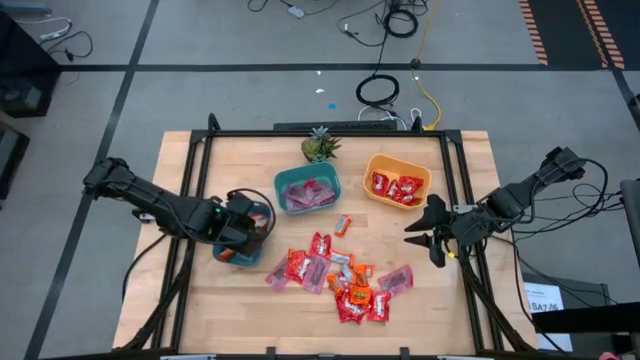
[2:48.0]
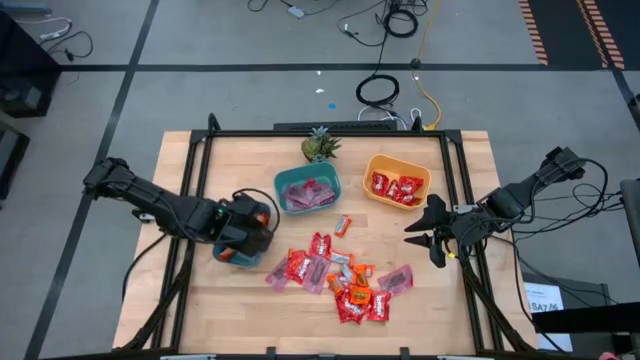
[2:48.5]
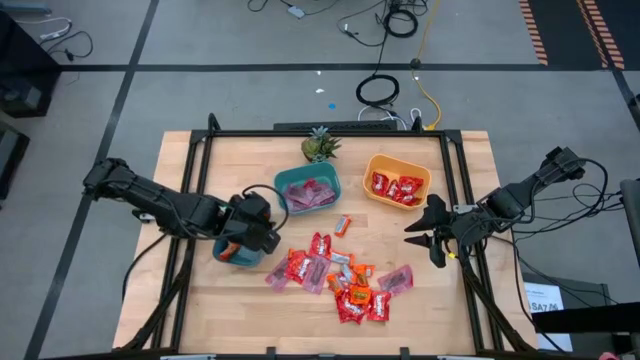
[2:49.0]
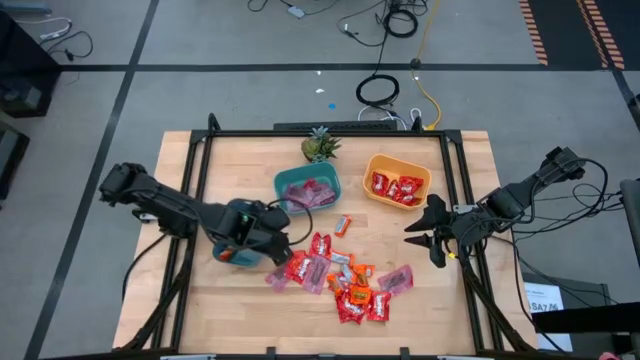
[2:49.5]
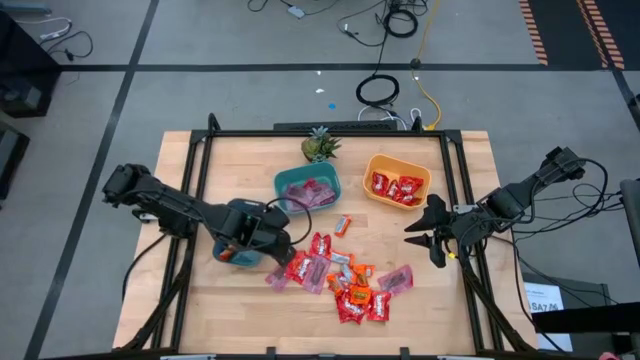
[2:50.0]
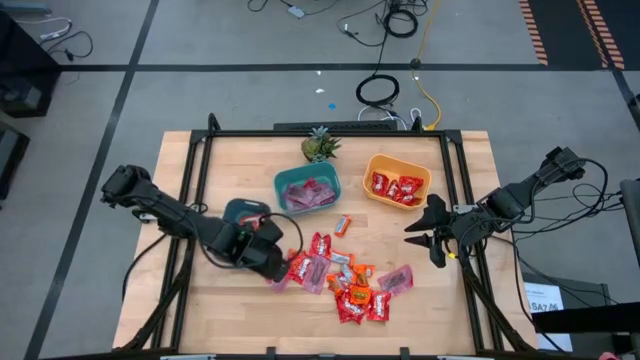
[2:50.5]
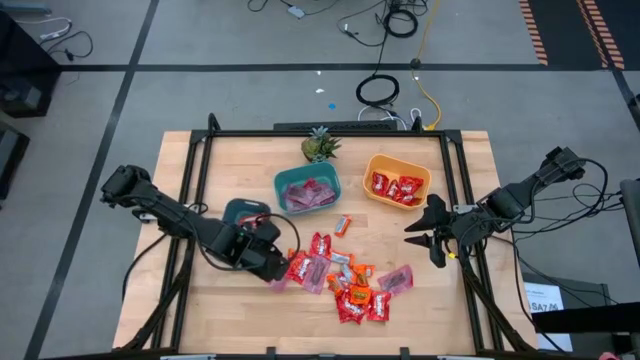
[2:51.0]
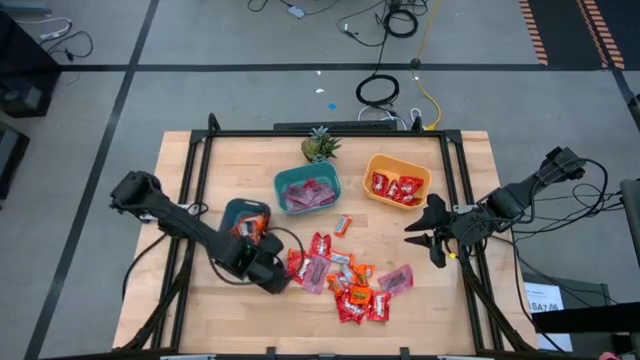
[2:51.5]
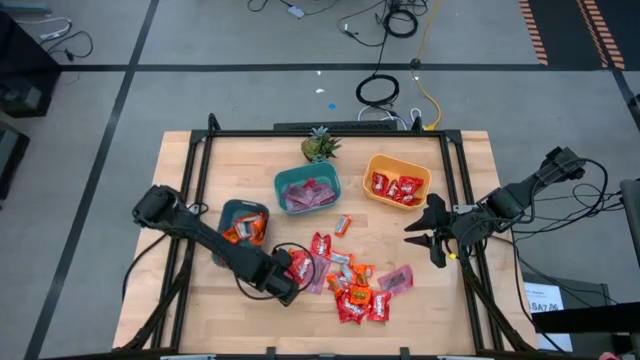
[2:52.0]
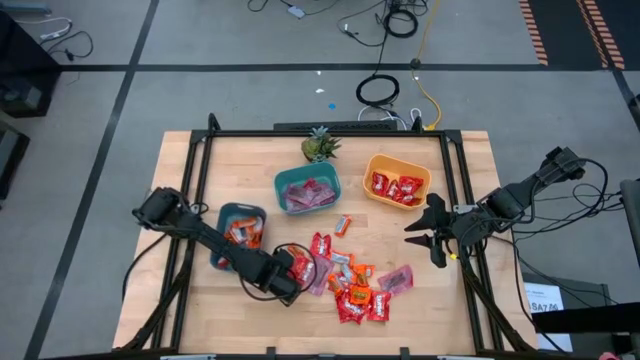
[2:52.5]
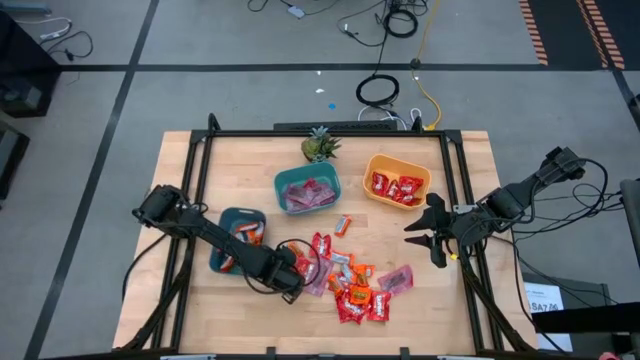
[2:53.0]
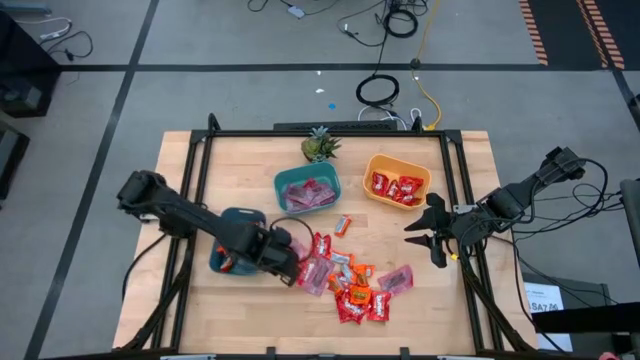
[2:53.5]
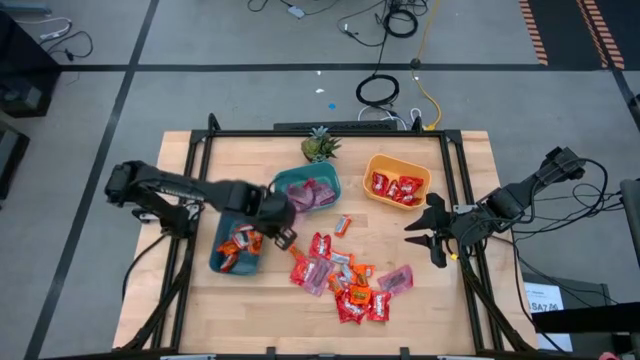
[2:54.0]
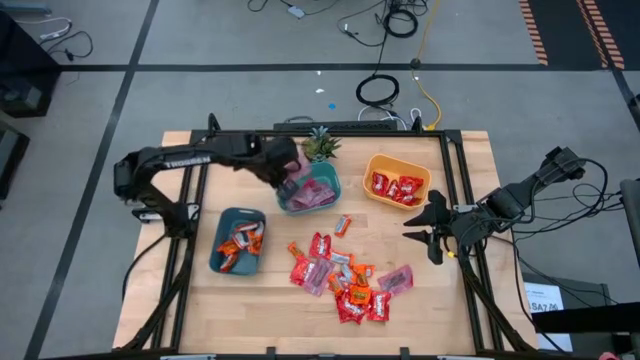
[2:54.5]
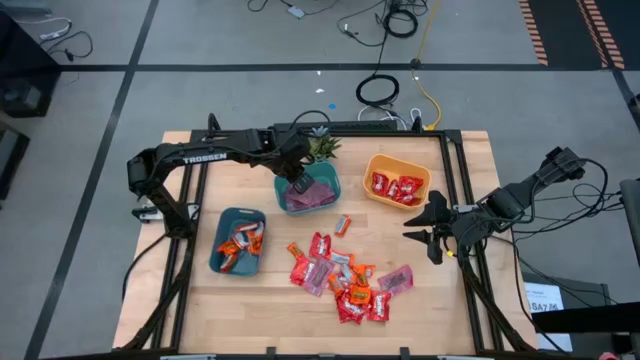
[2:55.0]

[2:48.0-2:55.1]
Task: Sort candy
Put the pink candy into the light blue bin

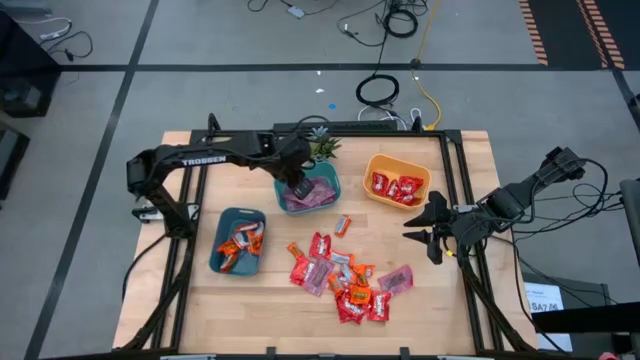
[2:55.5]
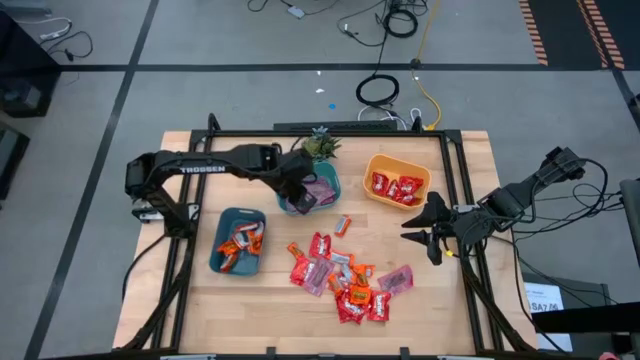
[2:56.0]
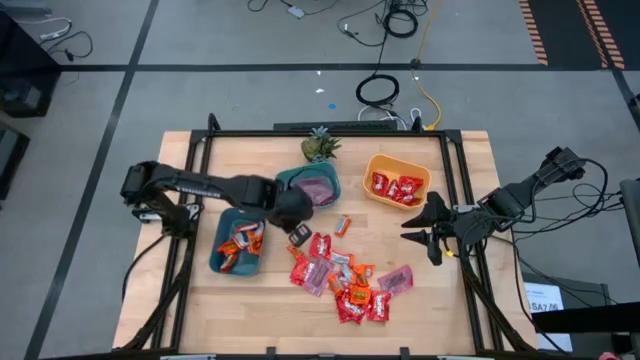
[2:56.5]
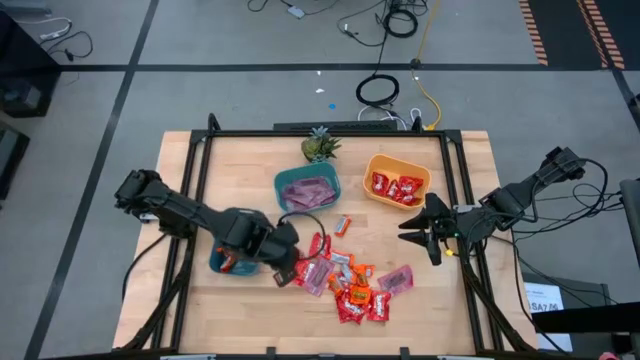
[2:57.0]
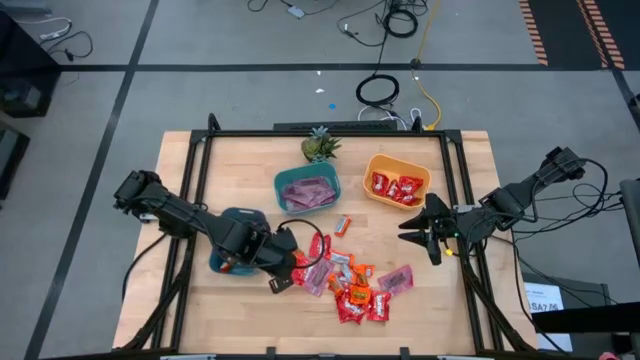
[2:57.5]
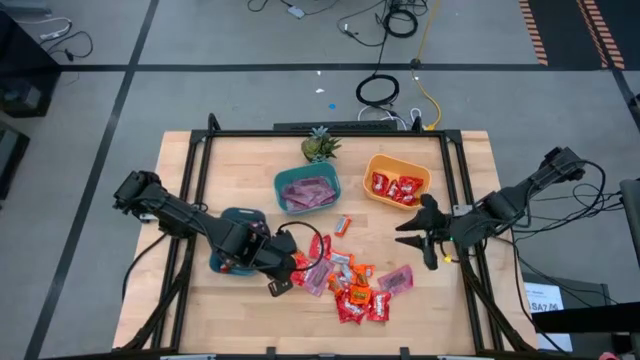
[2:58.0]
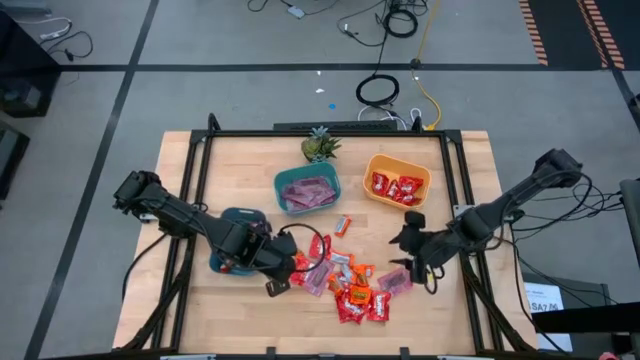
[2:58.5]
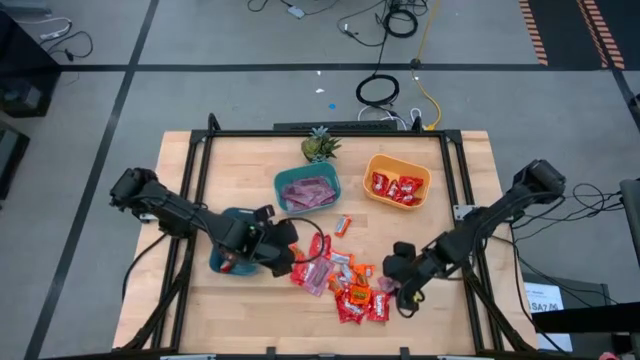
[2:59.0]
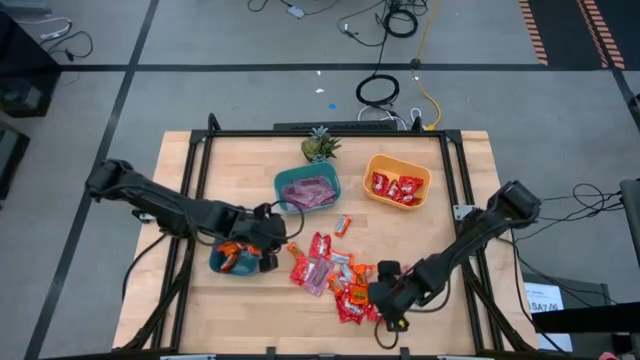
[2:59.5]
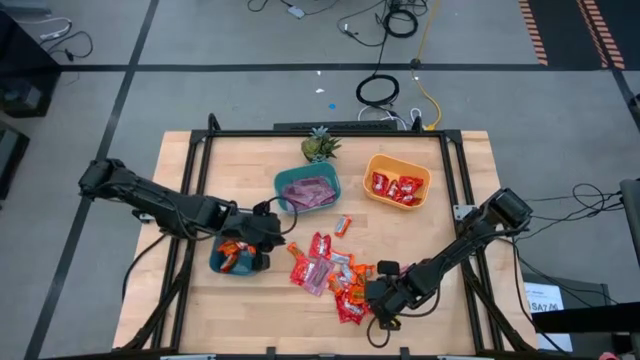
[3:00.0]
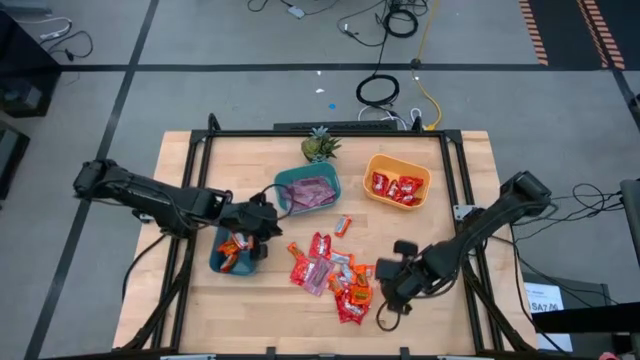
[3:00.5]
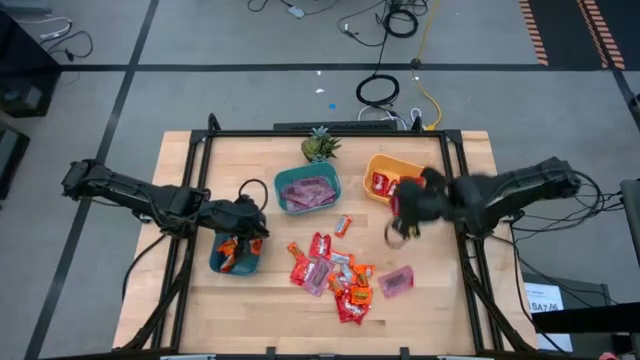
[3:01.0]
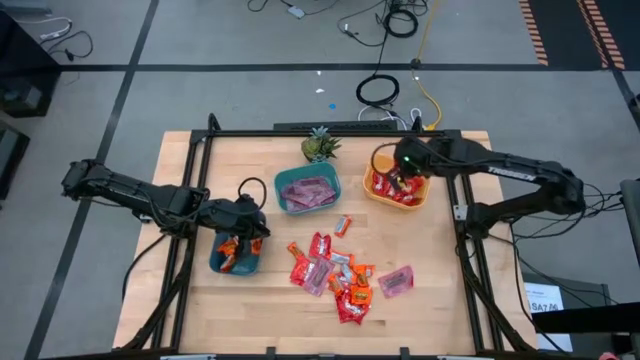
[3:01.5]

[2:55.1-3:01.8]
Put the red candy into the yellow bin

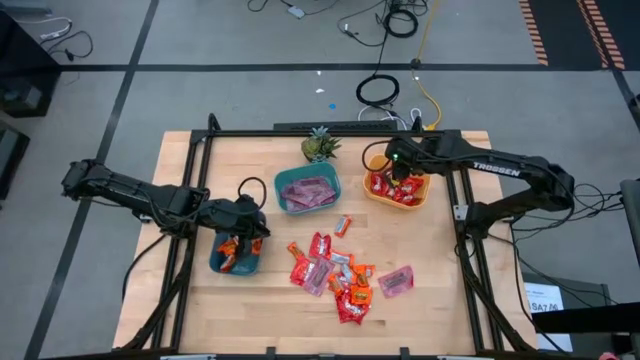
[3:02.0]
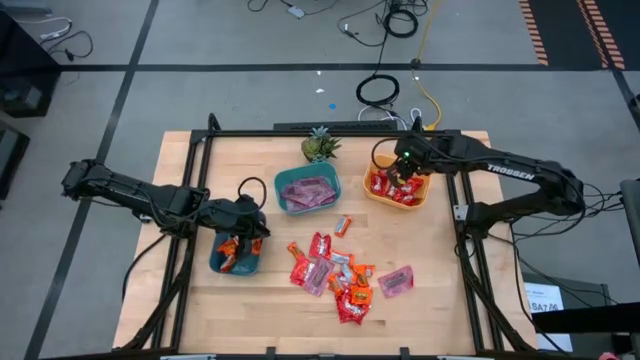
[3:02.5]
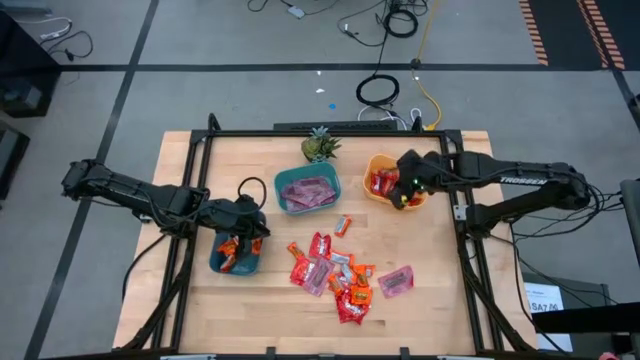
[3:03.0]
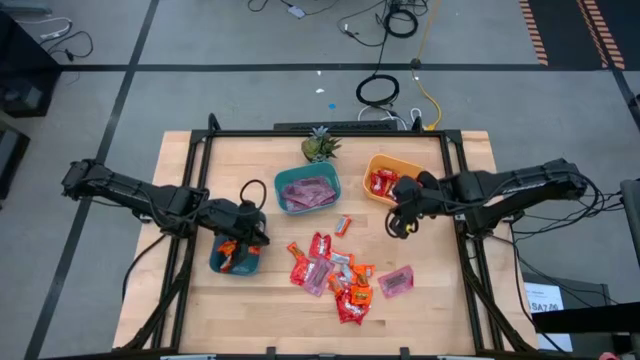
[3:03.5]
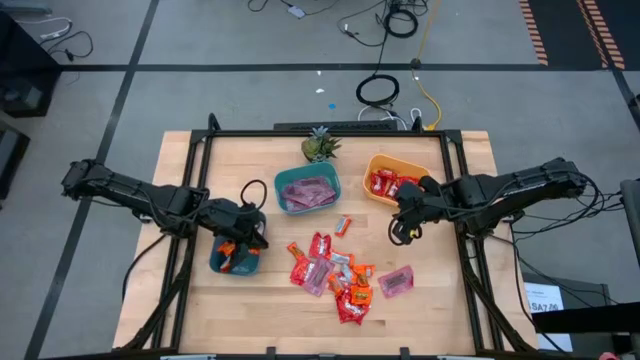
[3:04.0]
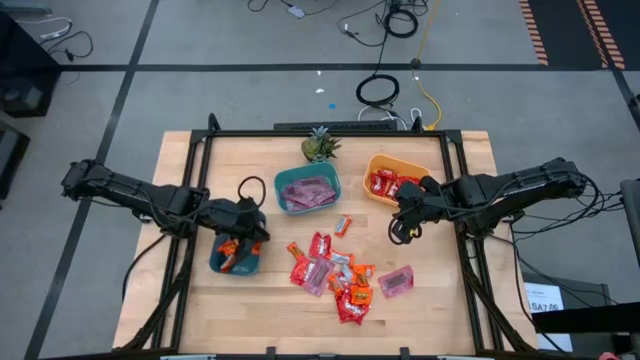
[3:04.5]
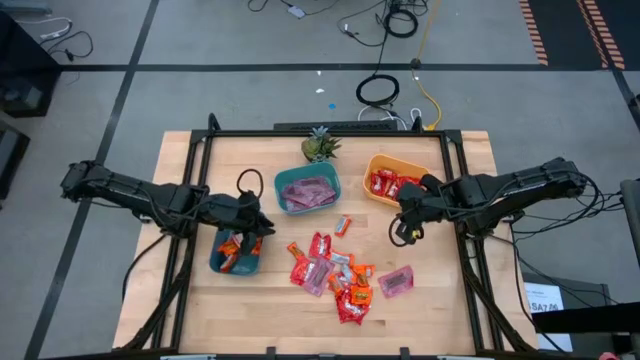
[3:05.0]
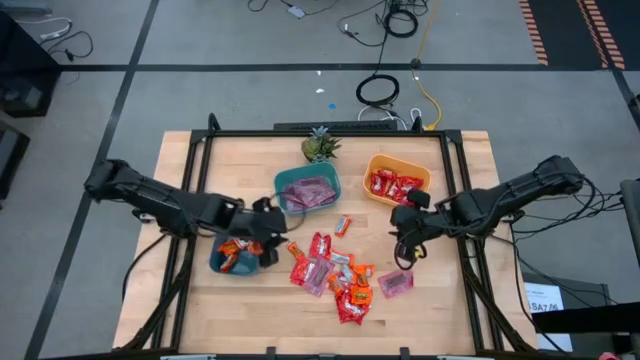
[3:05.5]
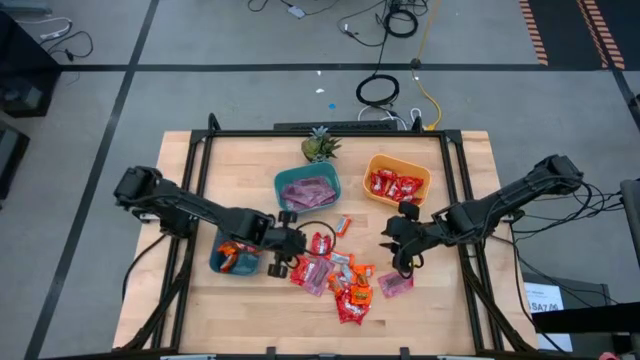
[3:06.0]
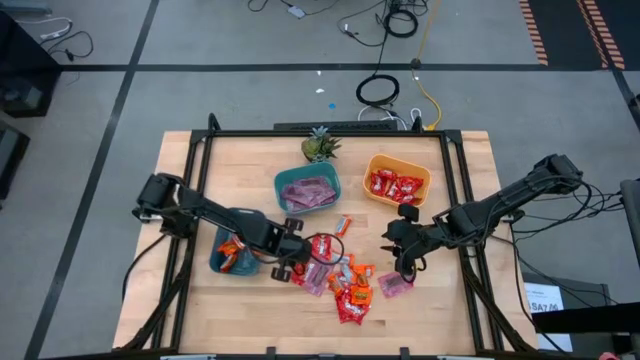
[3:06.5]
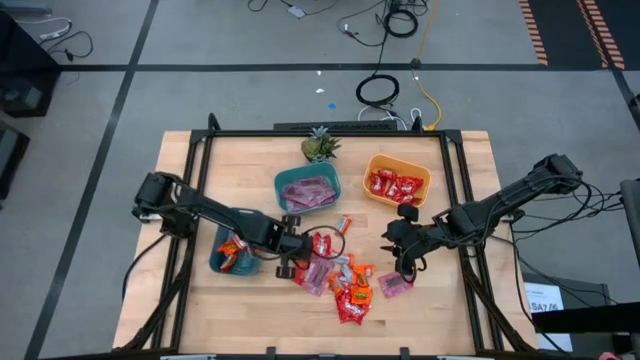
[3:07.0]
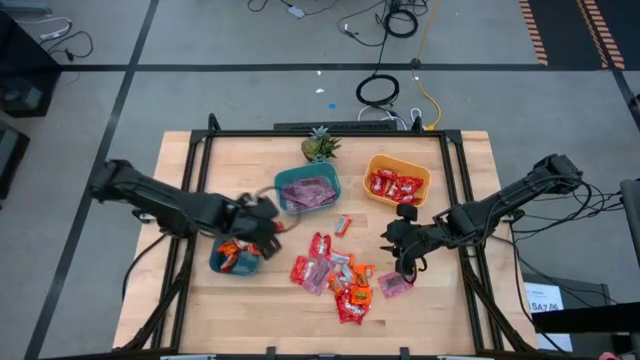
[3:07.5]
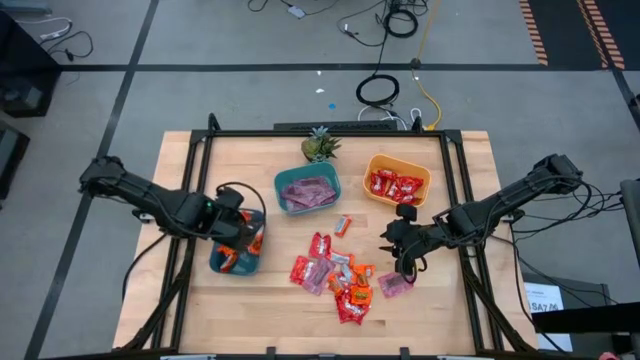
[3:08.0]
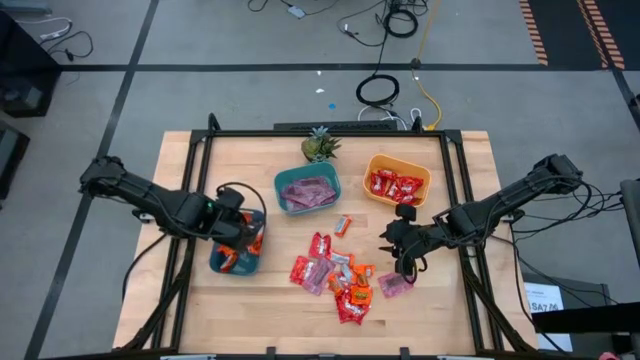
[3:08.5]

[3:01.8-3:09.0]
Put the orange chocolate into the blue bin
